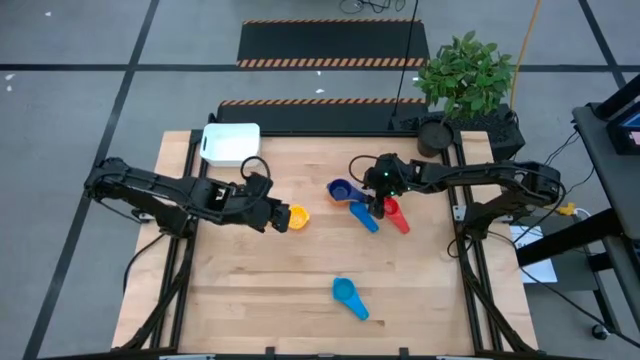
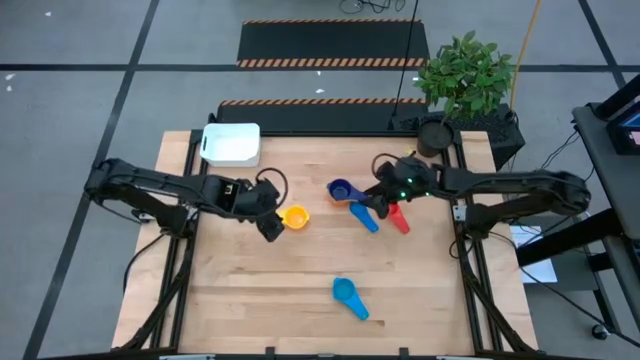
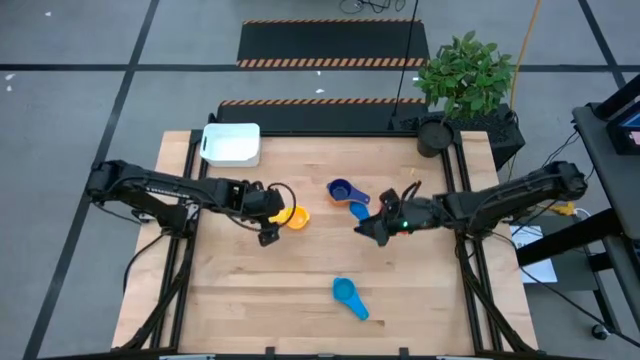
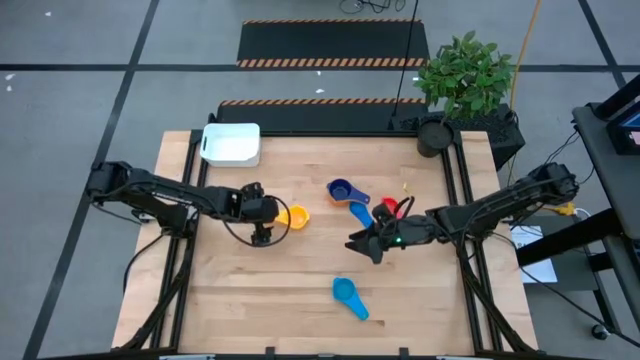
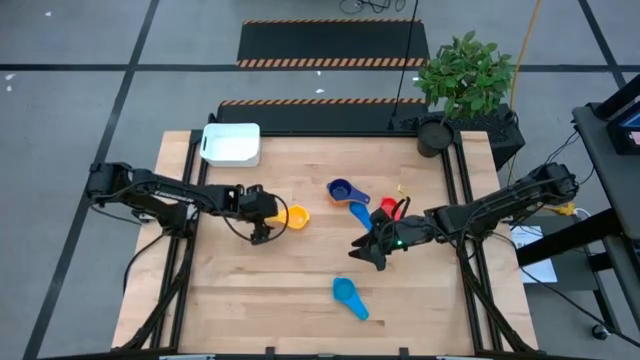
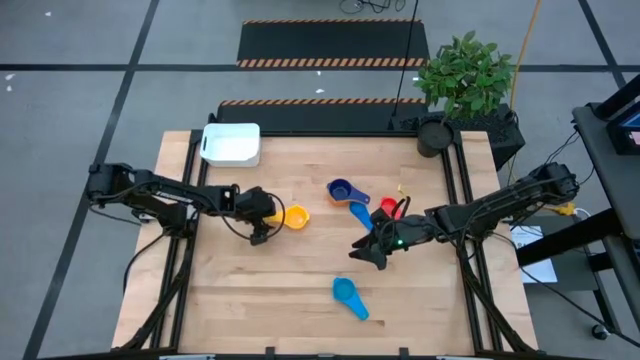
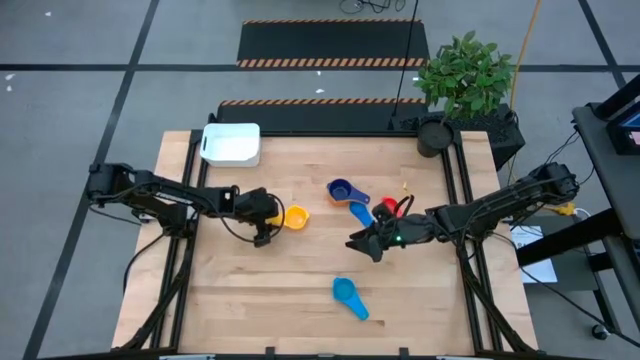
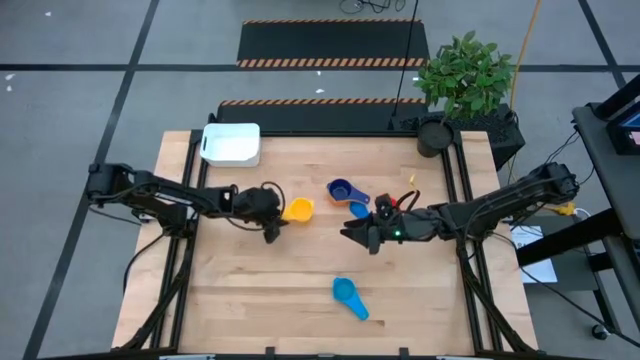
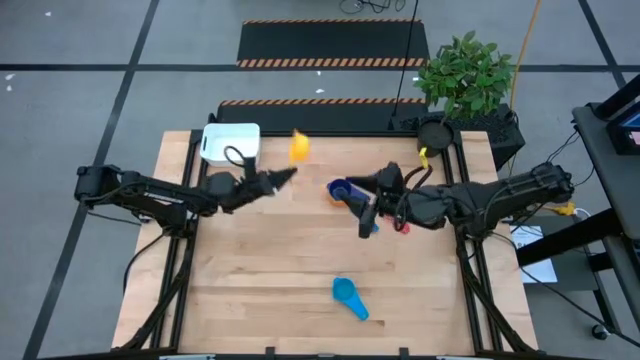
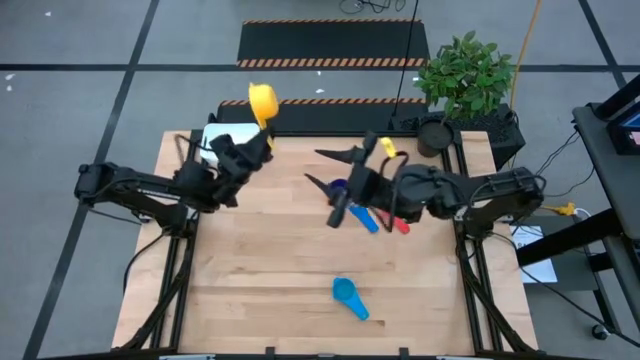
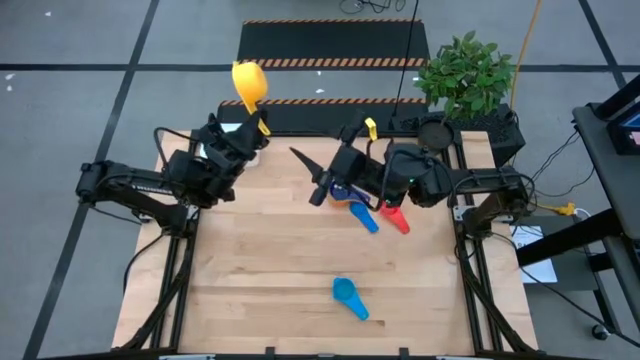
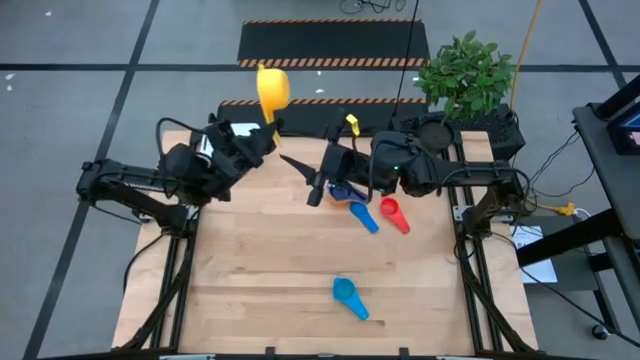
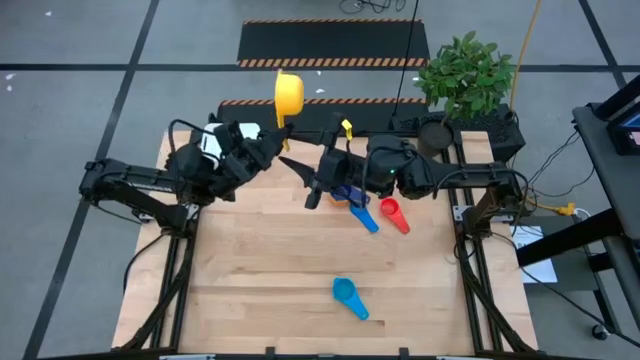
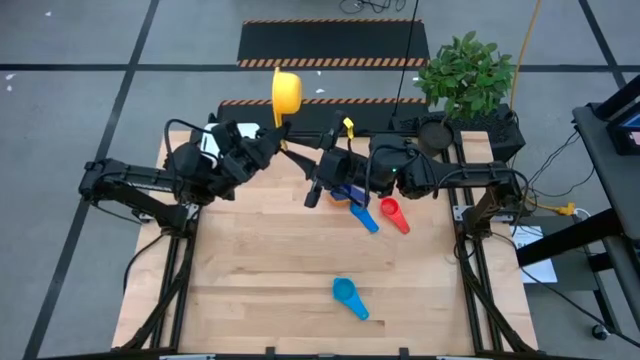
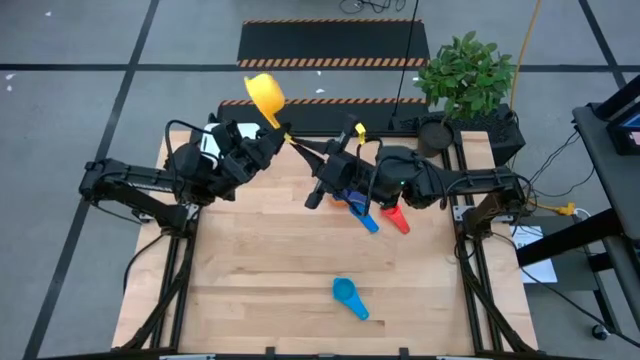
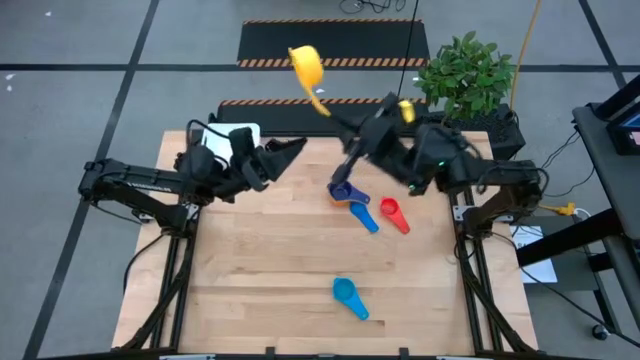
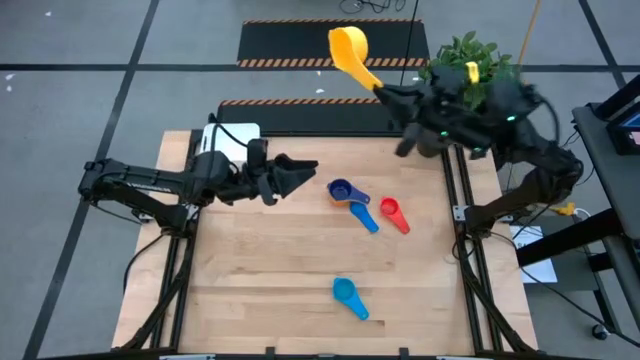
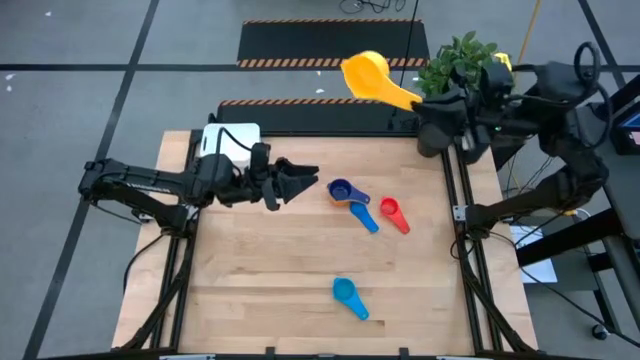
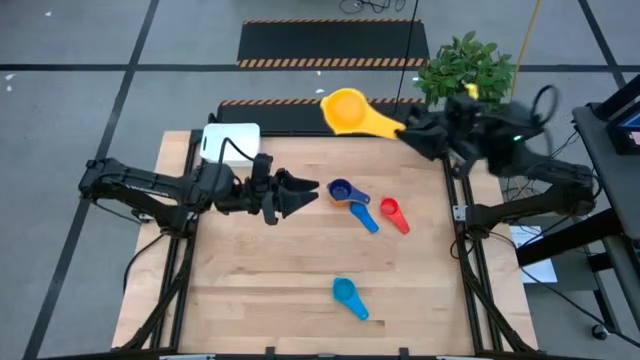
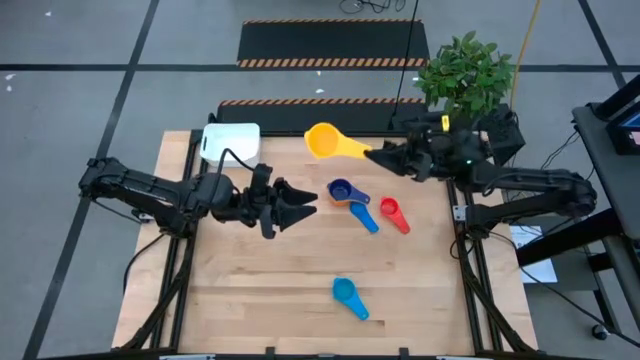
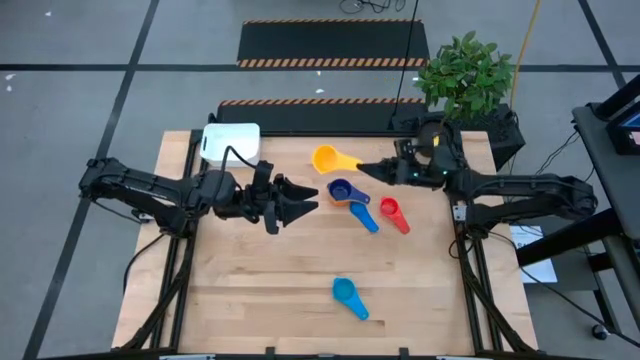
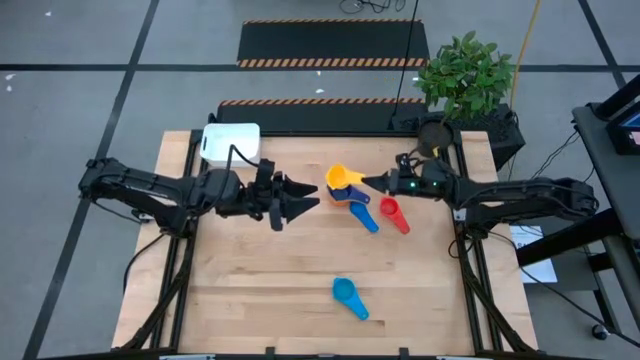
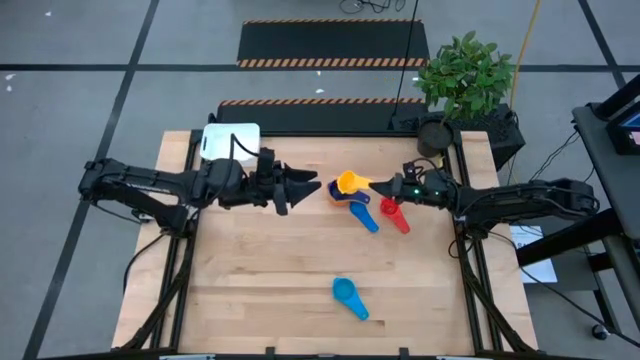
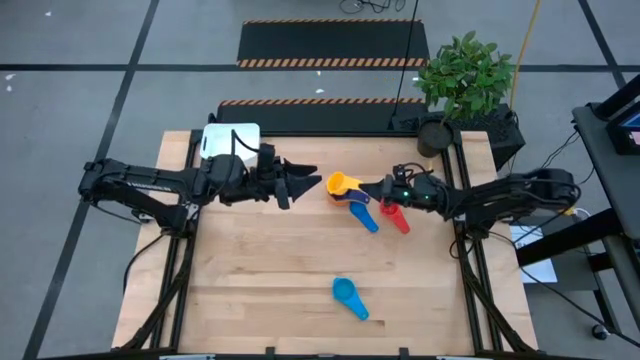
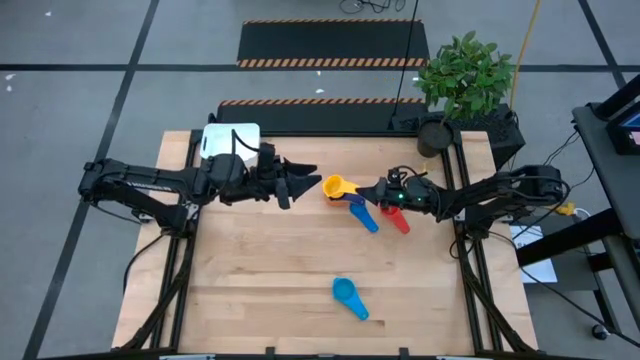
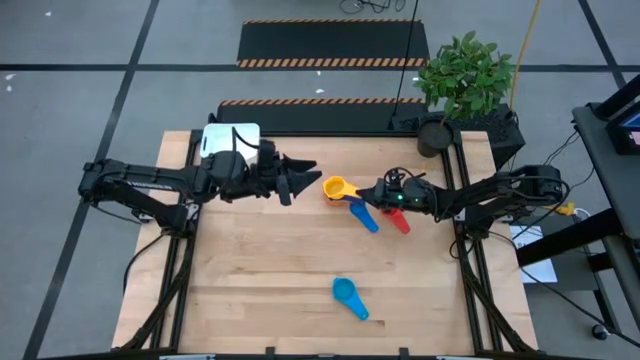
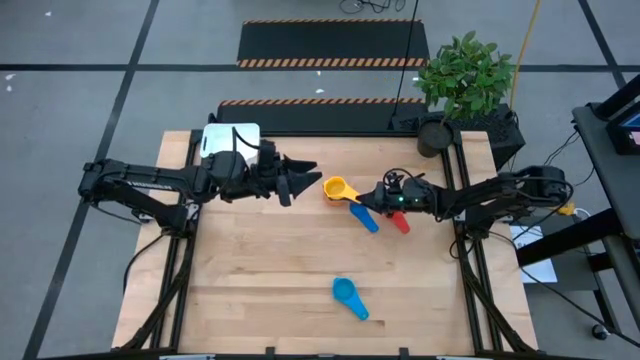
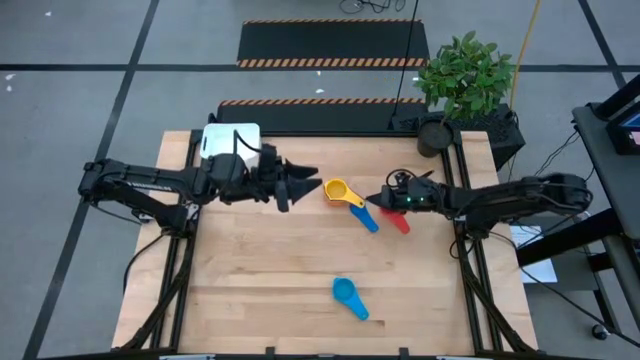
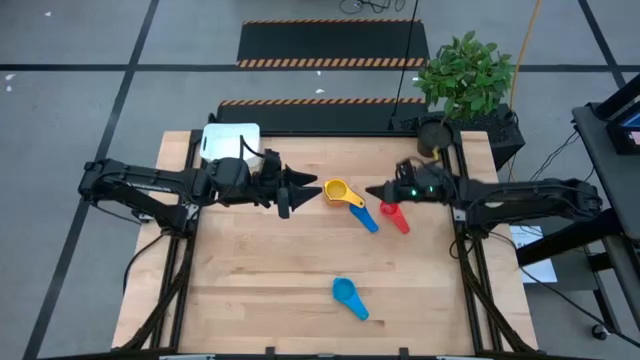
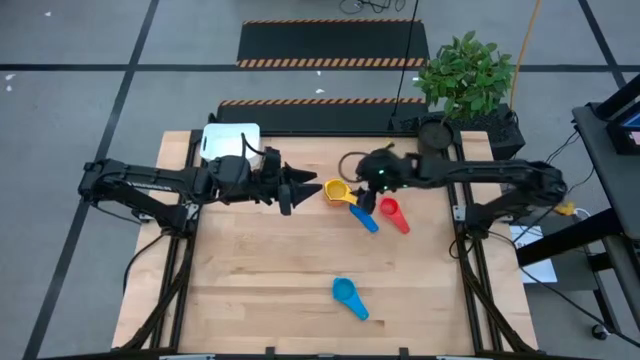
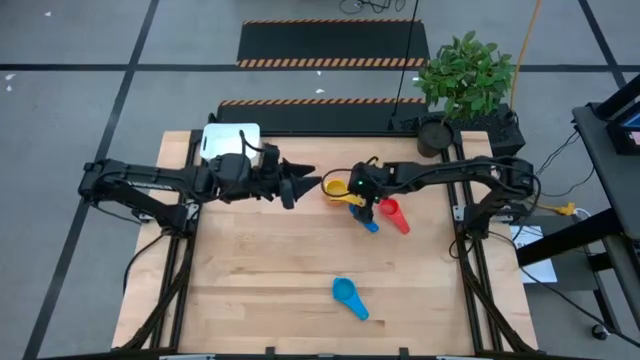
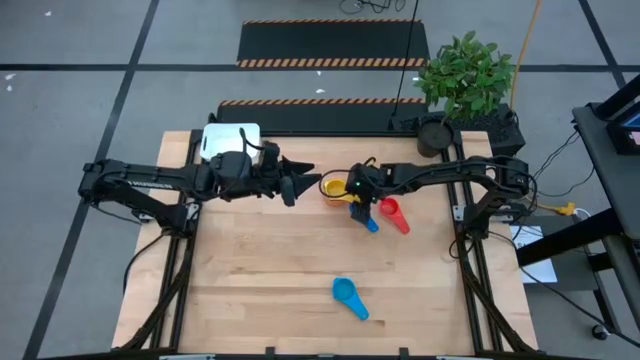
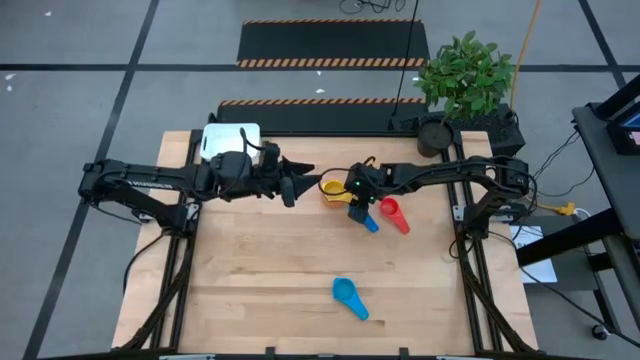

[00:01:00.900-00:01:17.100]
Task: Nest measuring cups in basket
Stack the yellow measuring cup into the dark blue measuring cup

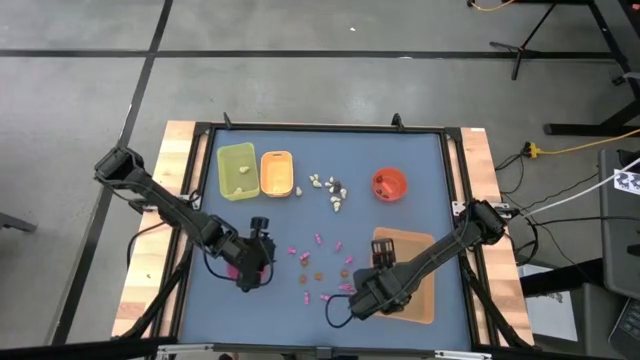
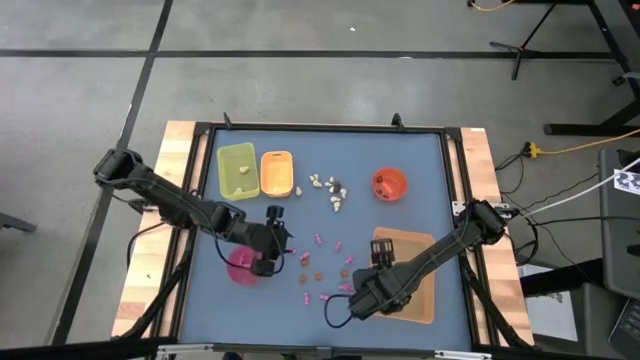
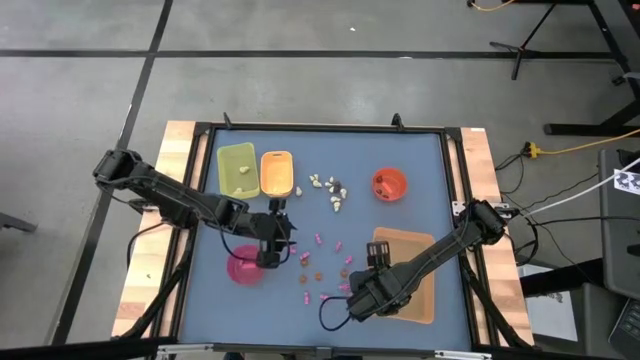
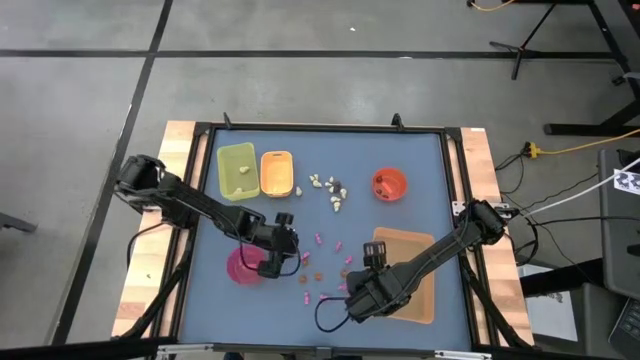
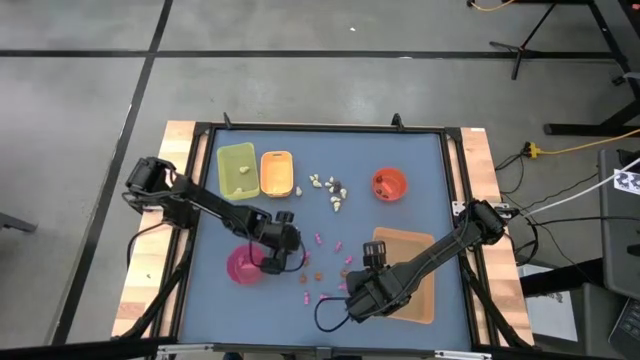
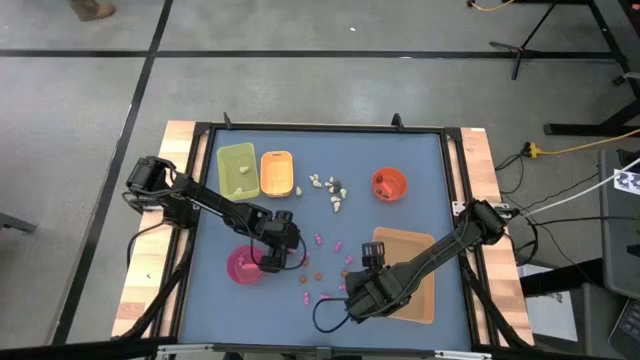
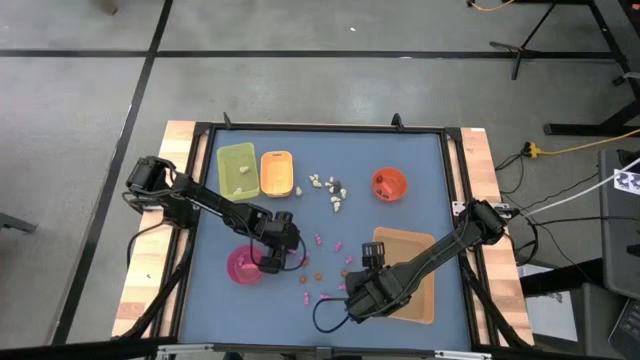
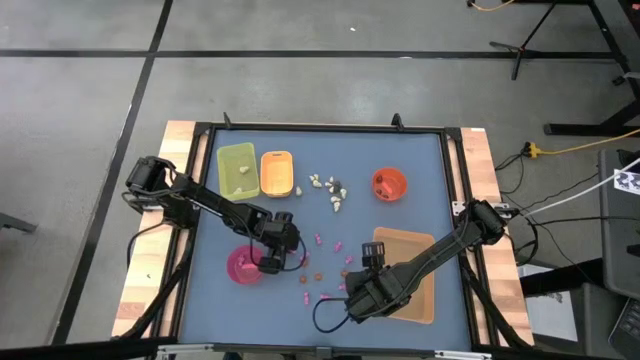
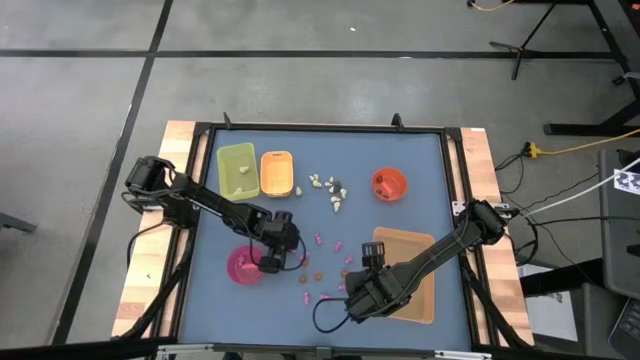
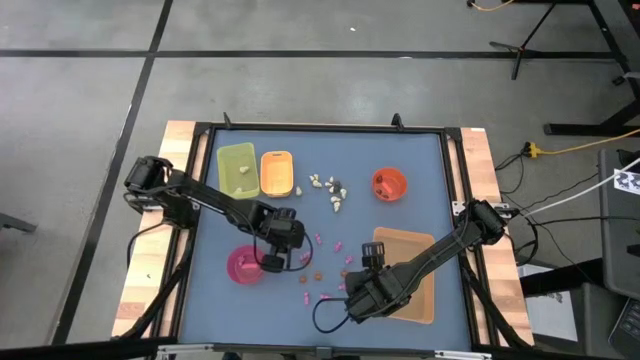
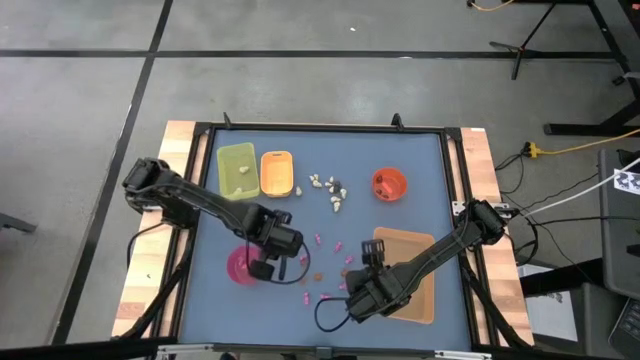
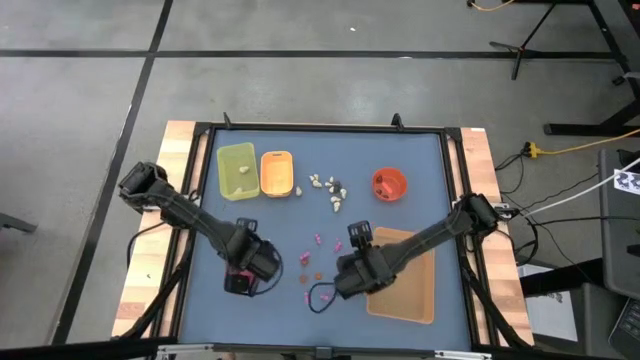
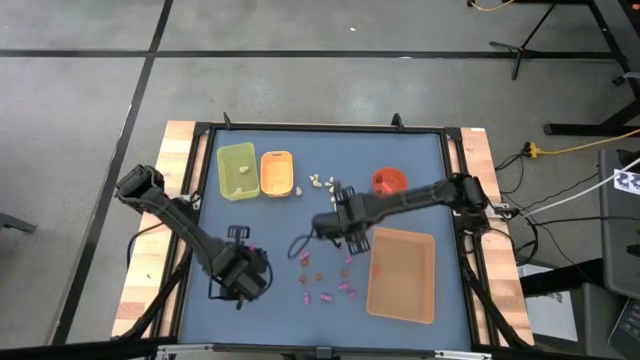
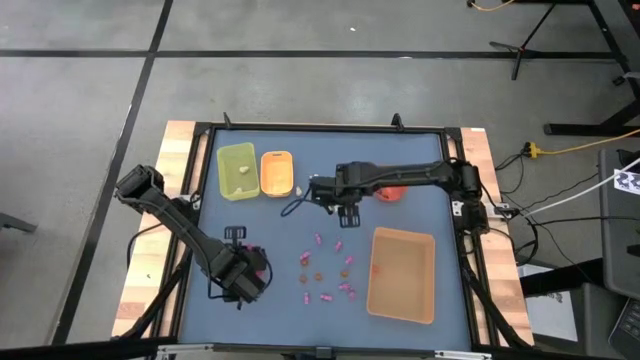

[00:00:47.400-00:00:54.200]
Task: Sort Halloween decoration
Put the pink skeleton toy into the red bowl
